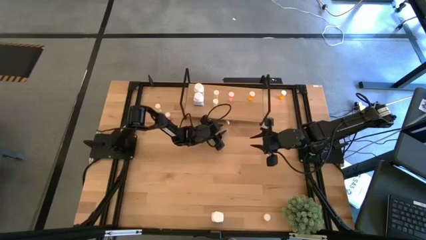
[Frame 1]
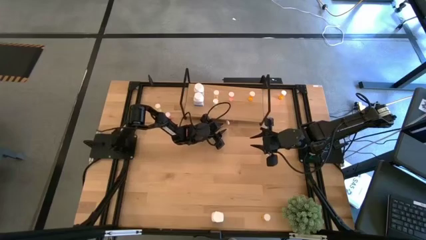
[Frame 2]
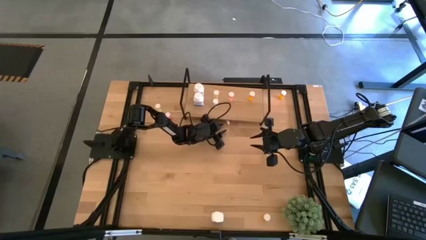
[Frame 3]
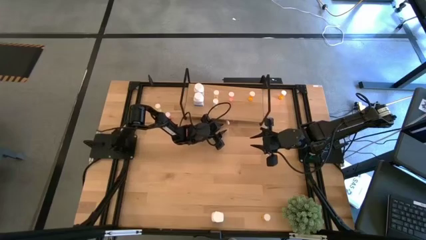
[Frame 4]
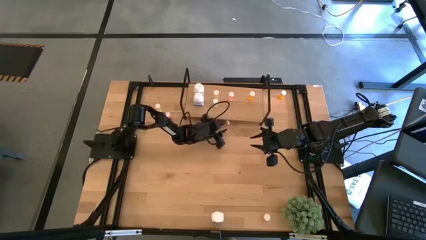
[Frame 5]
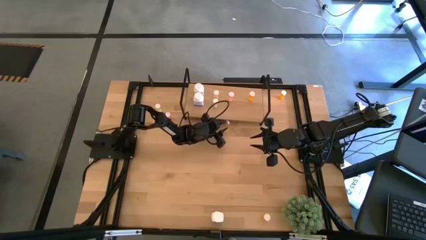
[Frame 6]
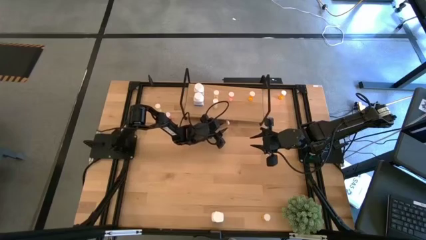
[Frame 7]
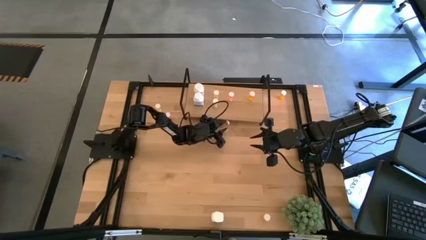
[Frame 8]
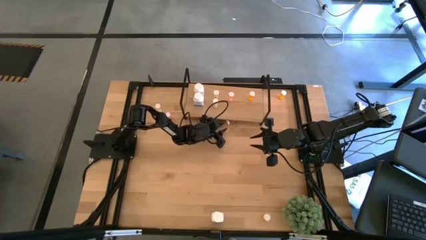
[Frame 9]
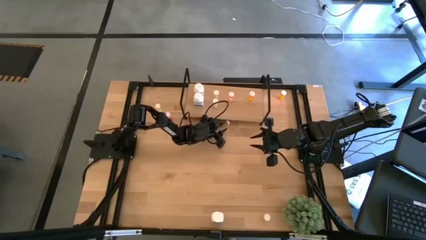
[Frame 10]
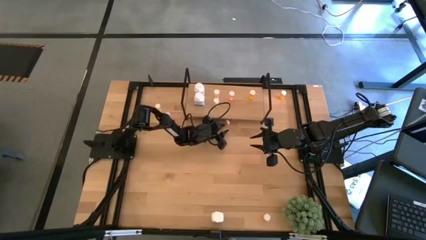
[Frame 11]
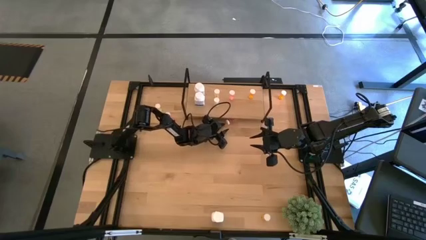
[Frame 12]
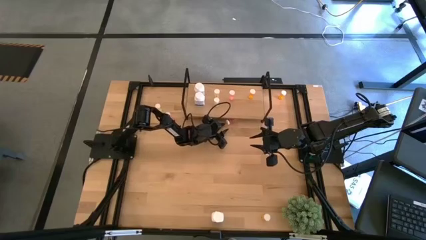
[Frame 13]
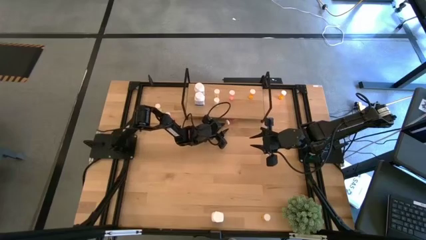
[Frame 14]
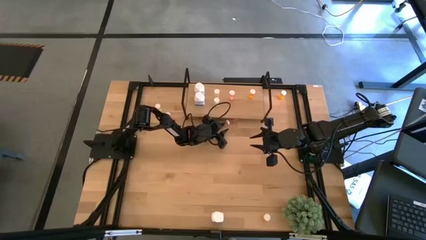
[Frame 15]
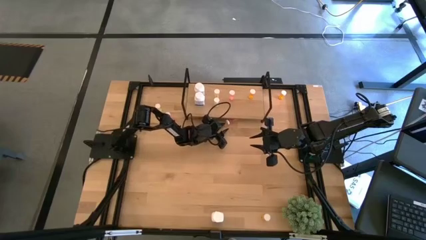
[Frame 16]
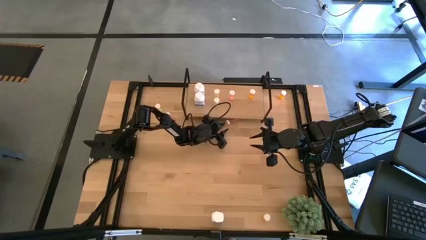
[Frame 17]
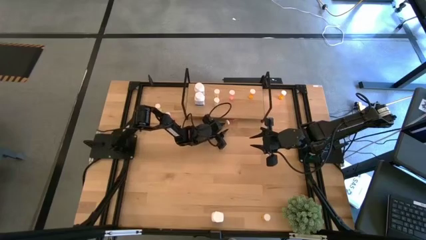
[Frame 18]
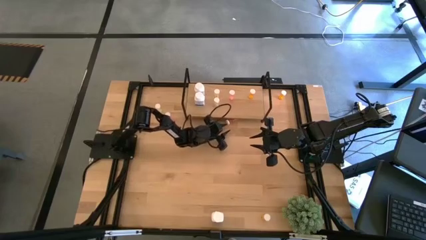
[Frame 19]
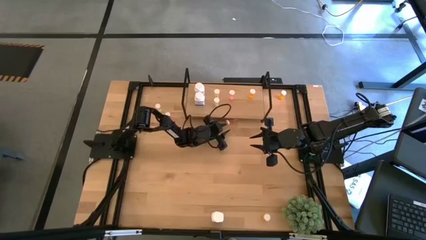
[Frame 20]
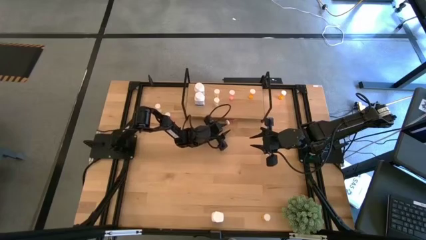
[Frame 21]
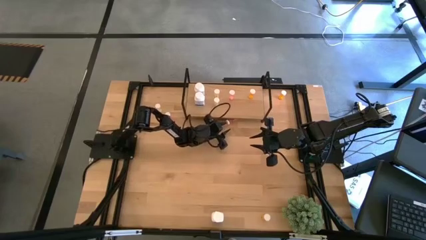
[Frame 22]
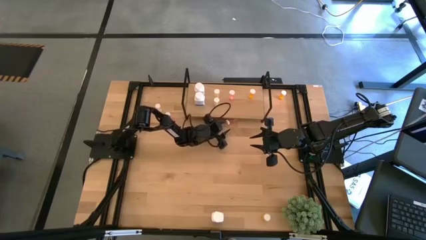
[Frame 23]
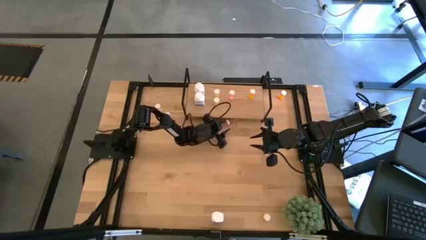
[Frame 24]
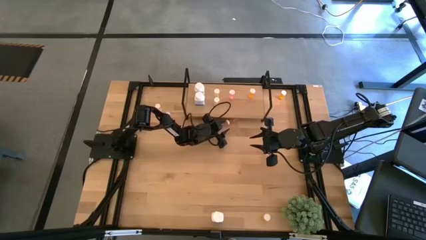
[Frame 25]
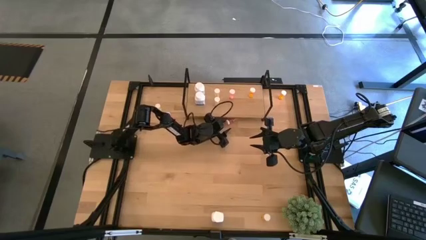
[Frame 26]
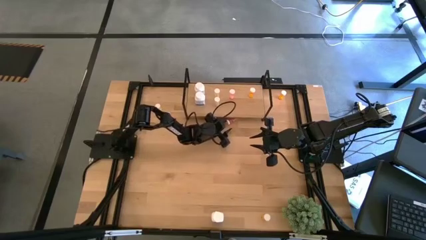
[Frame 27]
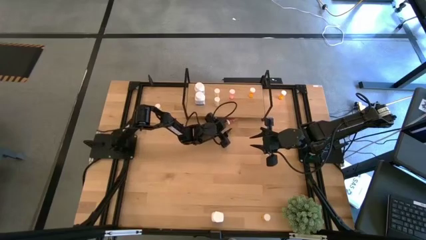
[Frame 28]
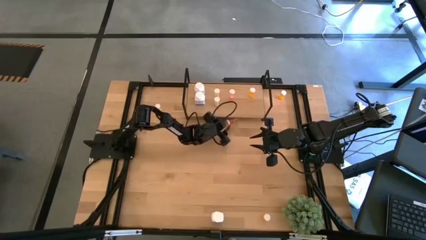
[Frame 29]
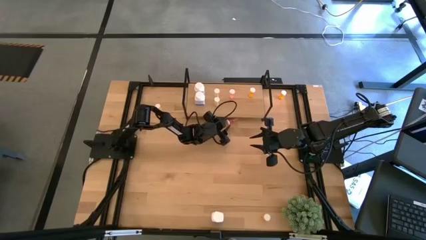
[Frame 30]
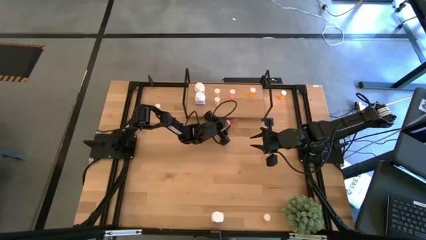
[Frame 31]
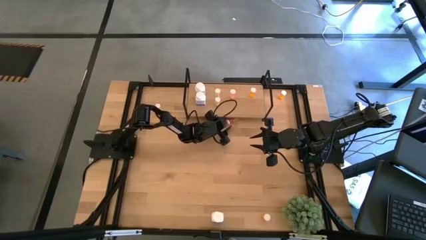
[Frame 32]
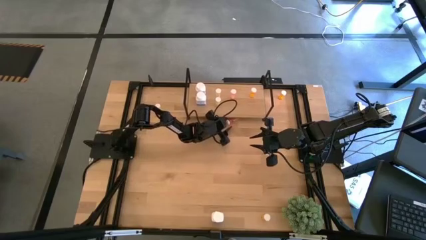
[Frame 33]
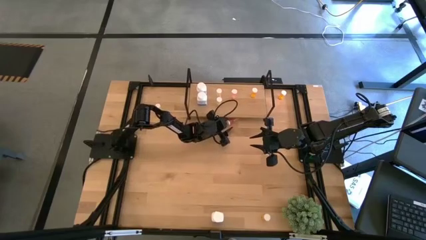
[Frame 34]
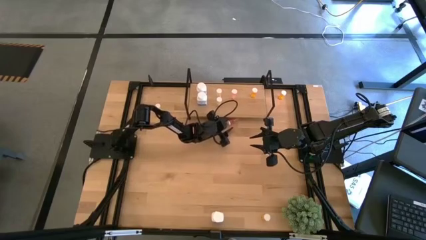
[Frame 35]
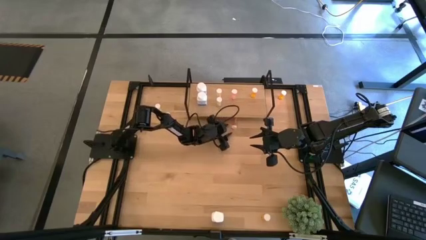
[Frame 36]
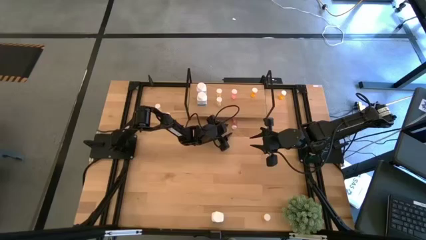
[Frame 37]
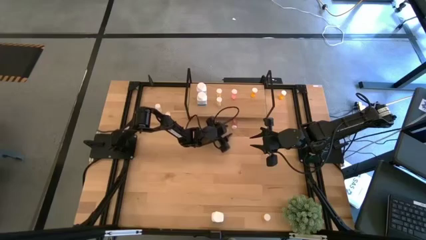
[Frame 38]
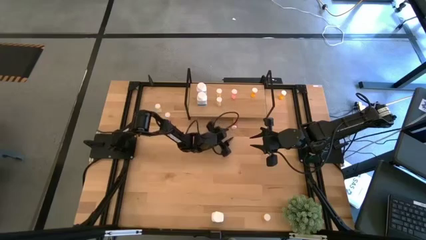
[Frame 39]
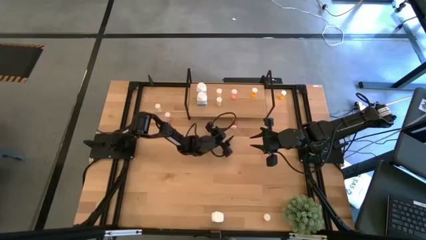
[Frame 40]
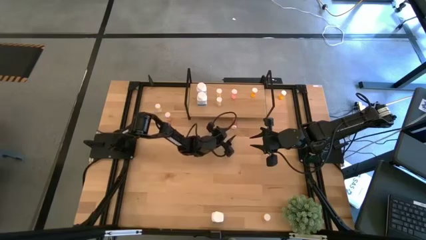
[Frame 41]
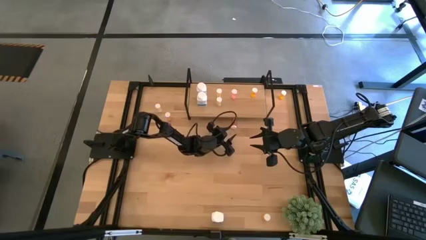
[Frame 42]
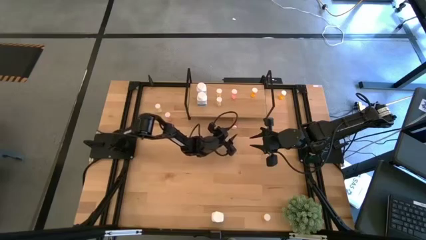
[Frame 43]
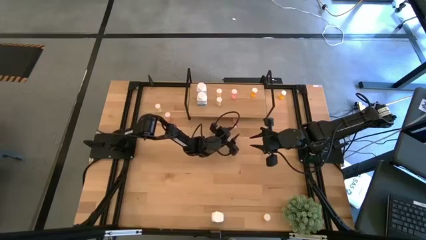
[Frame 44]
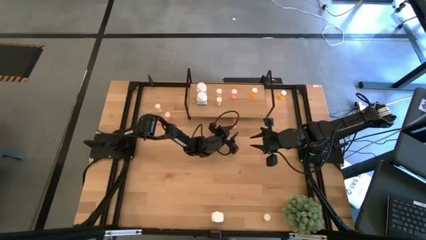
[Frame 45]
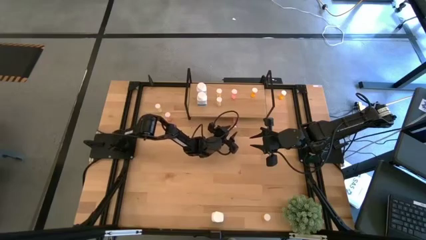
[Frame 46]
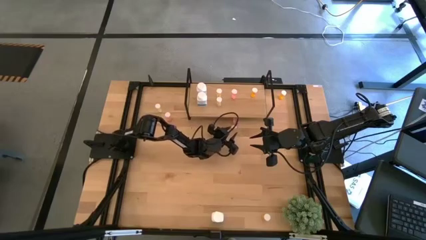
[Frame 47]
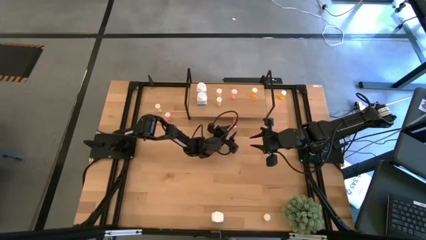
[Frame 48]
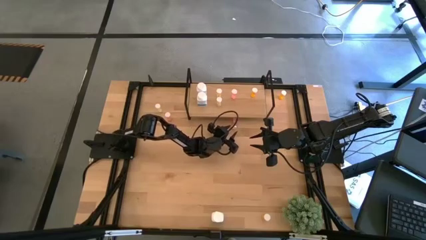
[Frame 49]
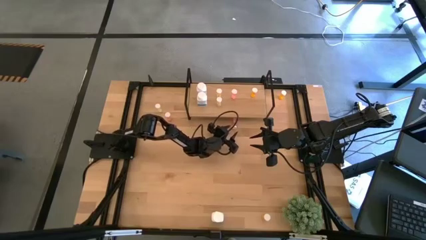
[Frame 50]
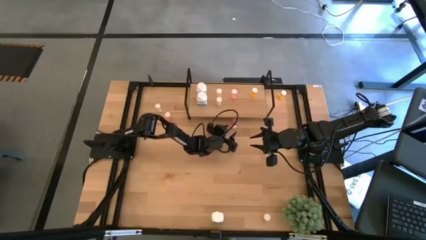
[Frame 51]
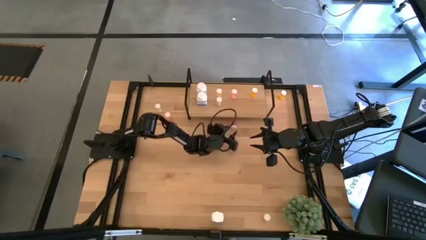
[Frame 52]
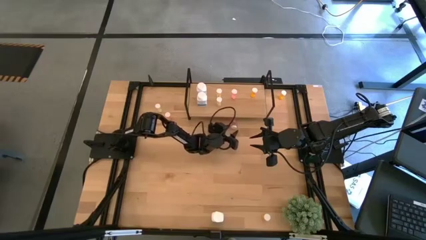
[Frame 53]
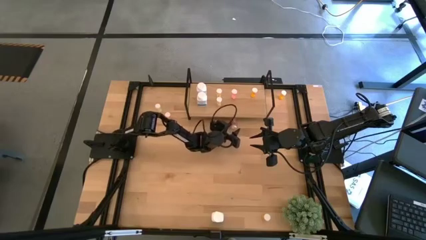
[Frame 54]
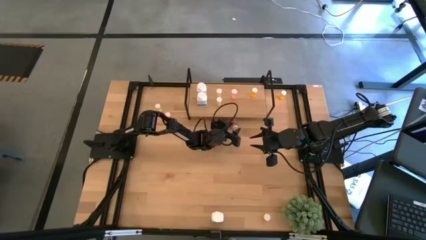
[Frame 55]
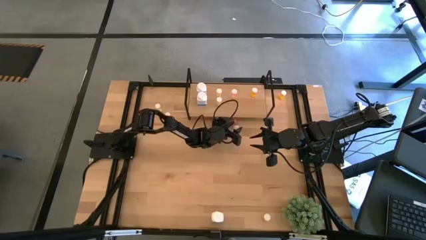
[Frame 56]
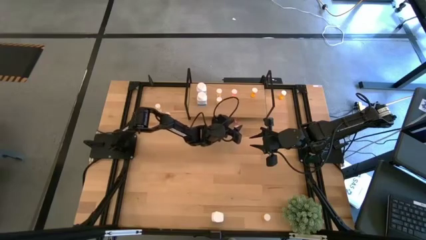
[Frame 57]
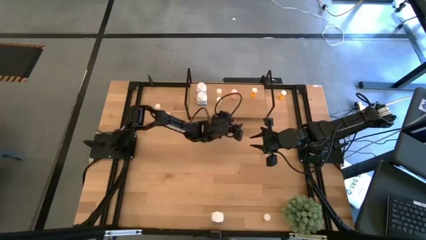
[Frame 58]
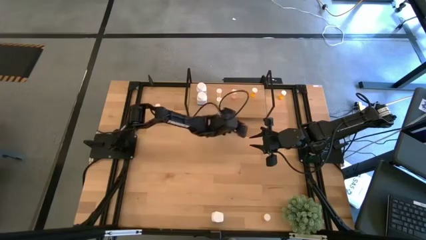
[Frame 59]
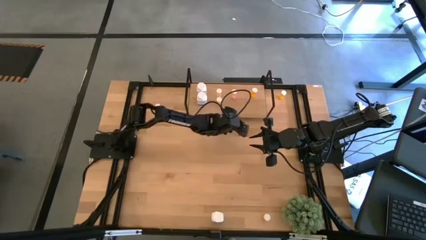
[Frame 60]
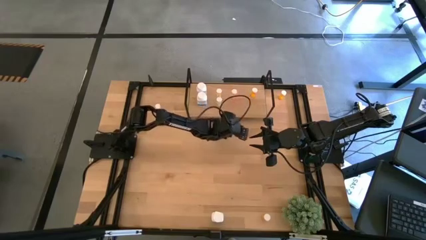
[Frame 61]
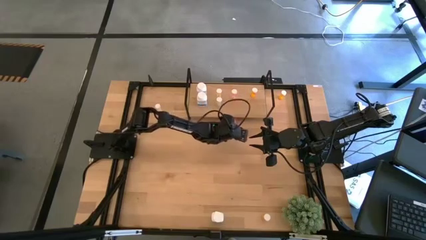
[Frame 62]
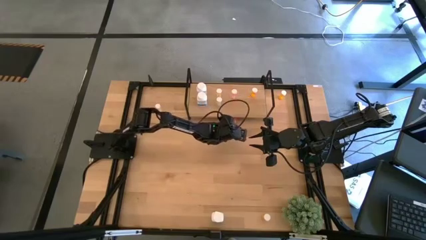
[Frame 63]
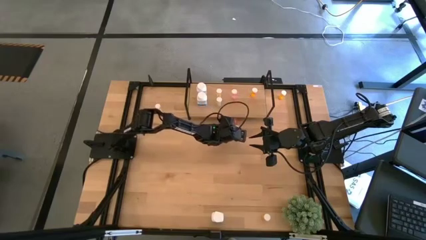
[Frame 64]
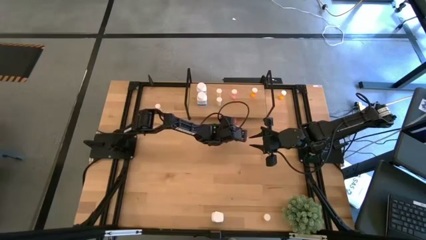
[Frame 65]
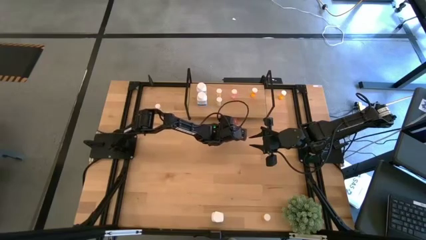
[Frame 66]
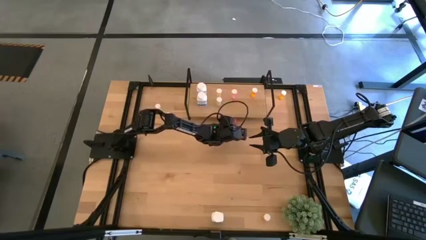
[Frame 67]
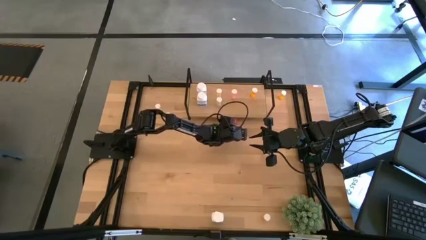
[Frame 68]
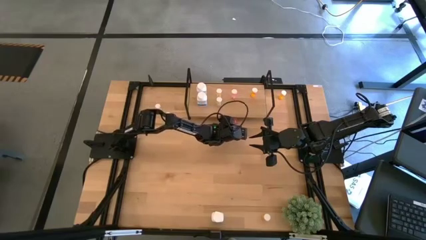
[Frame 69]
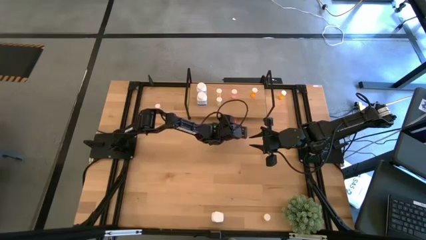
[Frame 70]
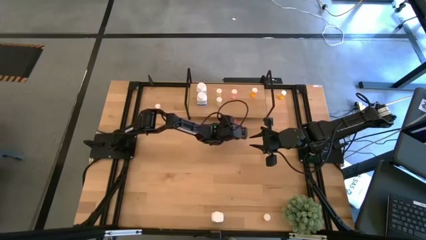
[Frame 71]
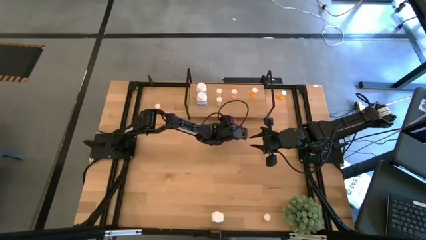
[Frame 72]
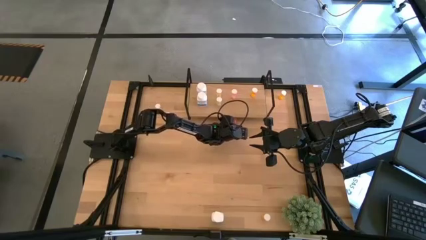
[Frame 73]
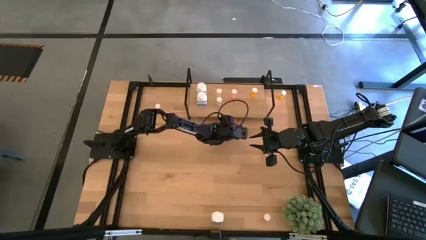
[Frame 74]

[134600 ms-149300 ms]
Task: Pick and place medicine bottles onto shelf by color
Put the bottom red pill bottle on the shelf aligned with the other red pill bottle
